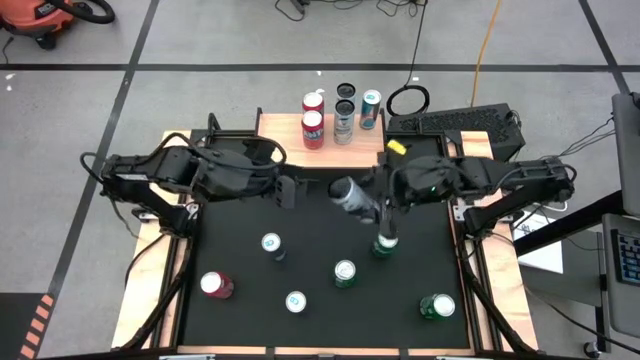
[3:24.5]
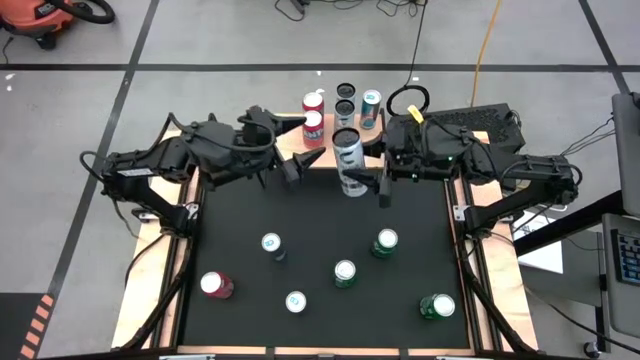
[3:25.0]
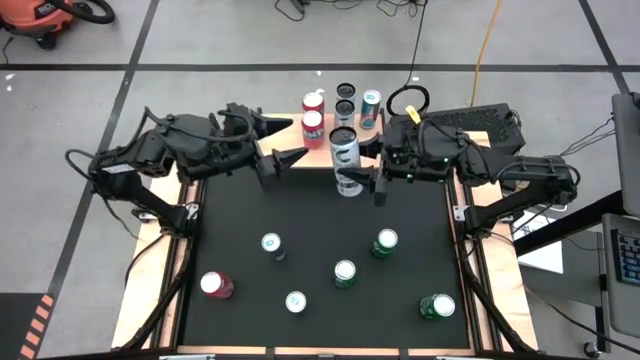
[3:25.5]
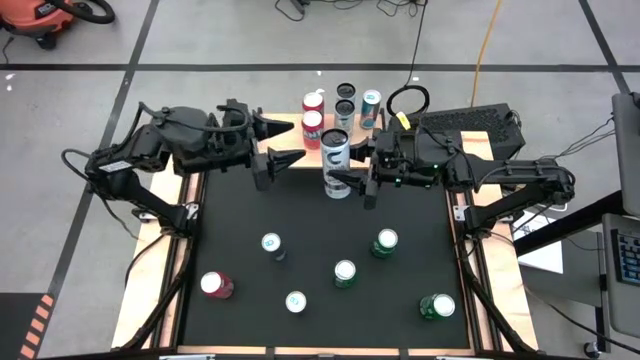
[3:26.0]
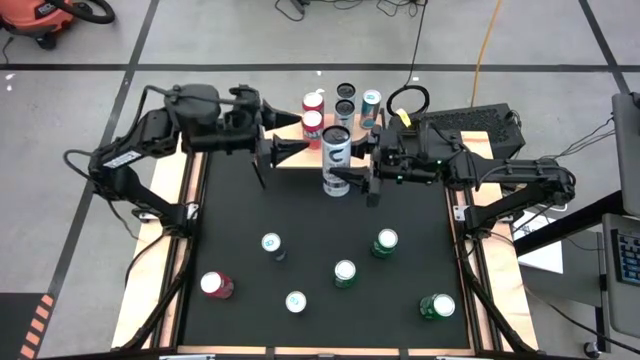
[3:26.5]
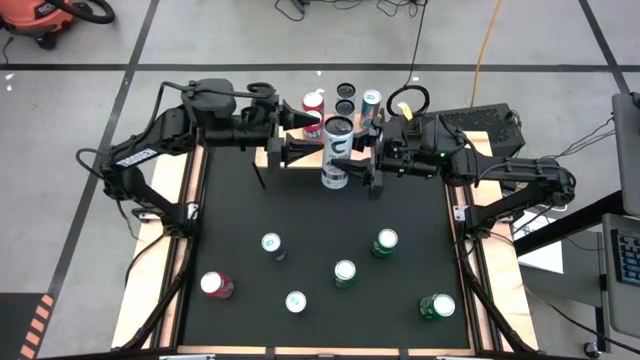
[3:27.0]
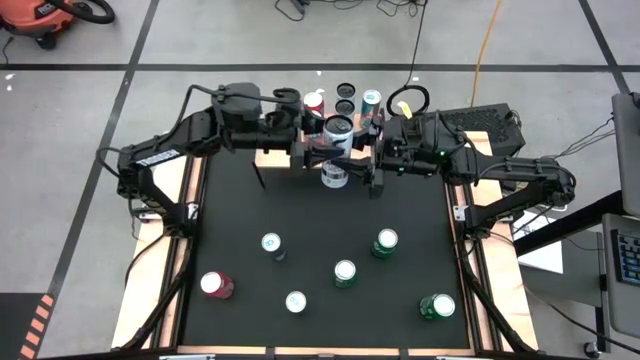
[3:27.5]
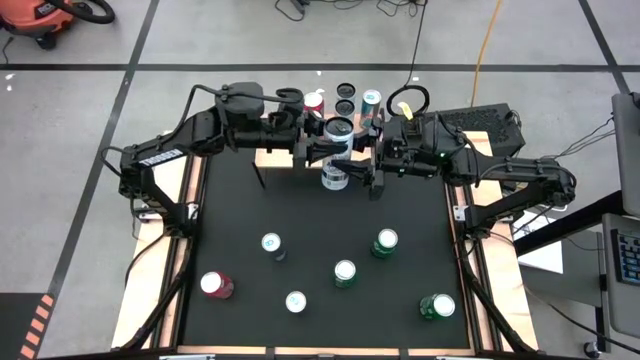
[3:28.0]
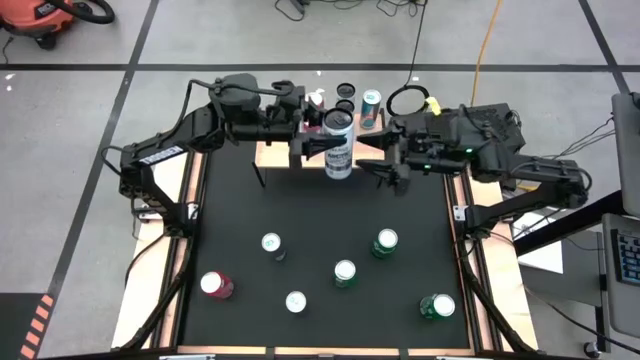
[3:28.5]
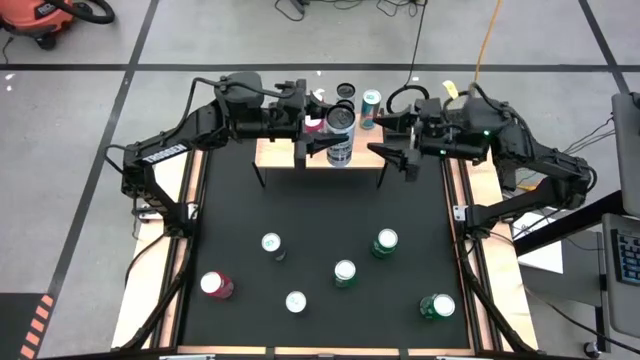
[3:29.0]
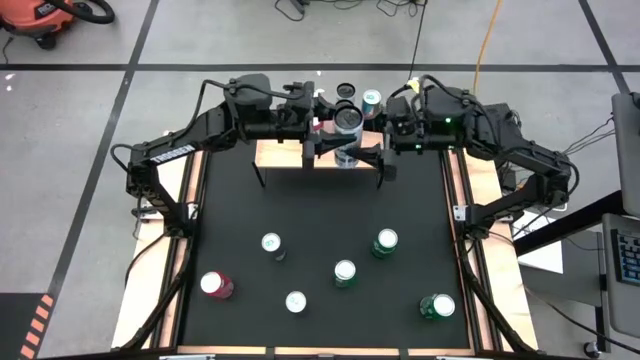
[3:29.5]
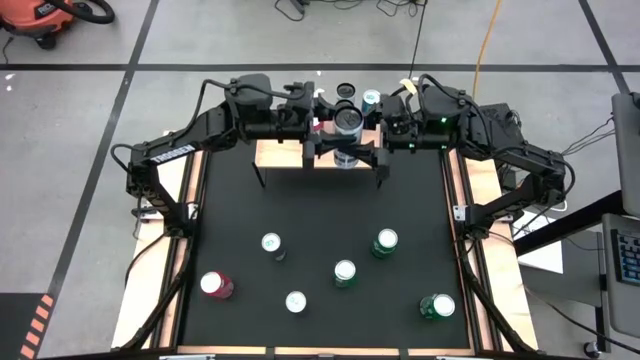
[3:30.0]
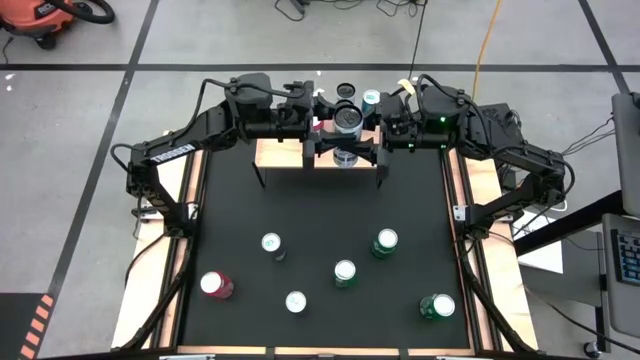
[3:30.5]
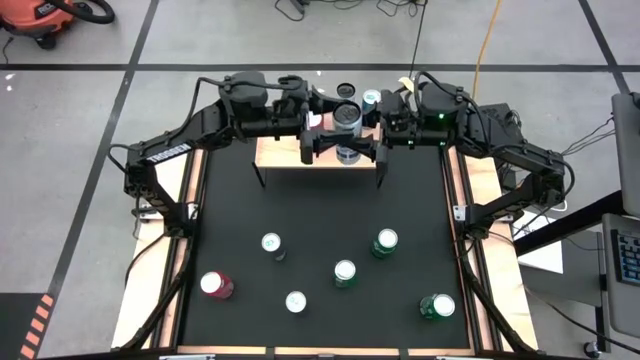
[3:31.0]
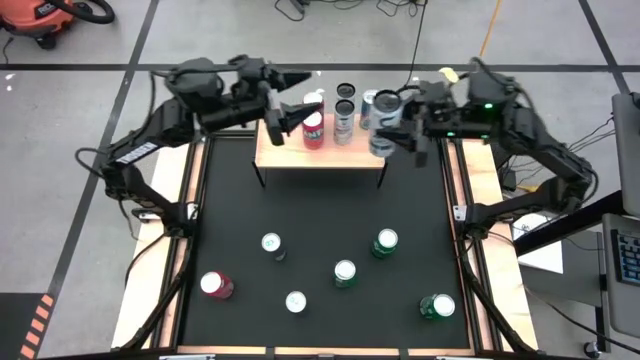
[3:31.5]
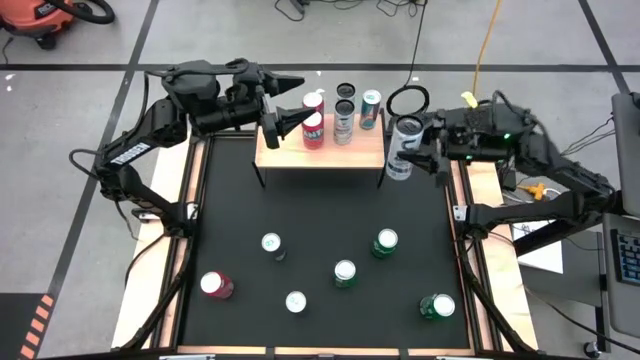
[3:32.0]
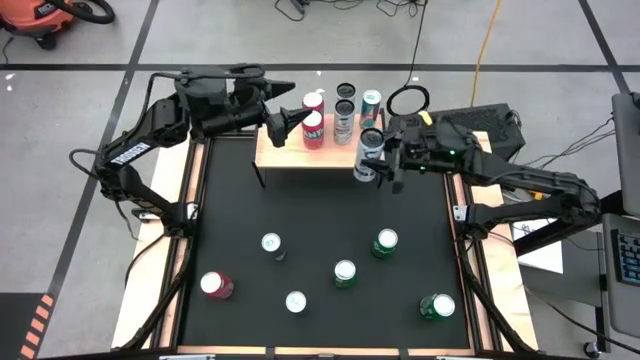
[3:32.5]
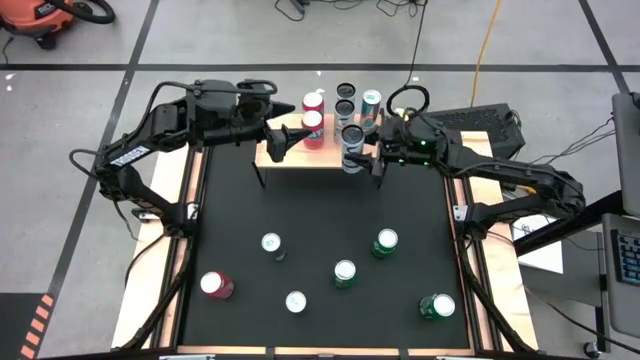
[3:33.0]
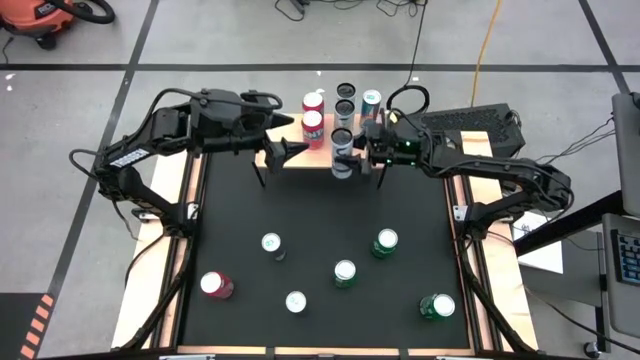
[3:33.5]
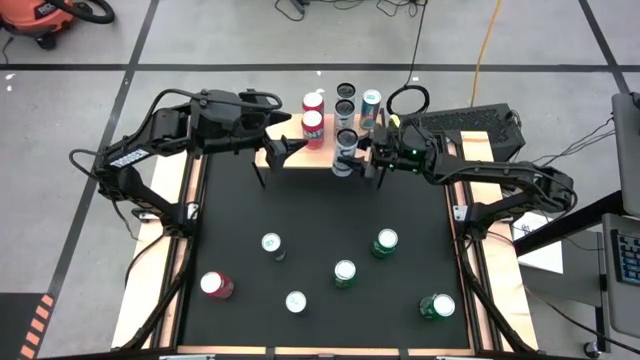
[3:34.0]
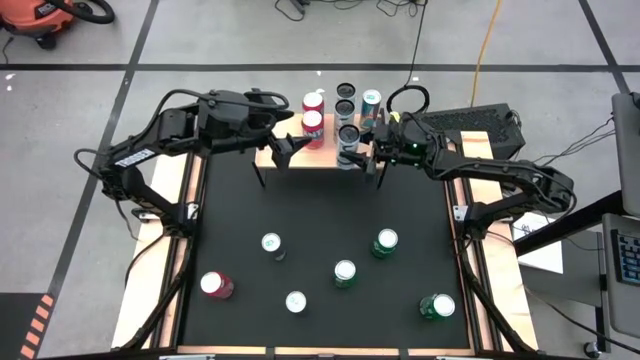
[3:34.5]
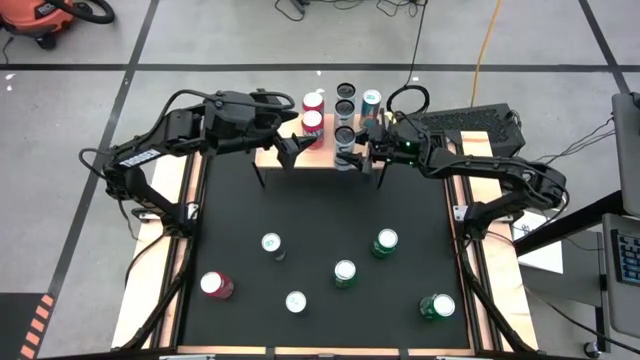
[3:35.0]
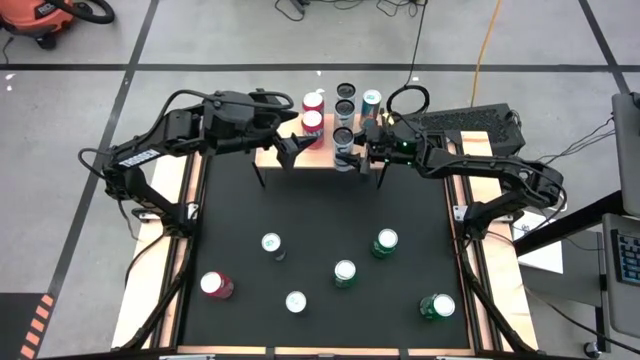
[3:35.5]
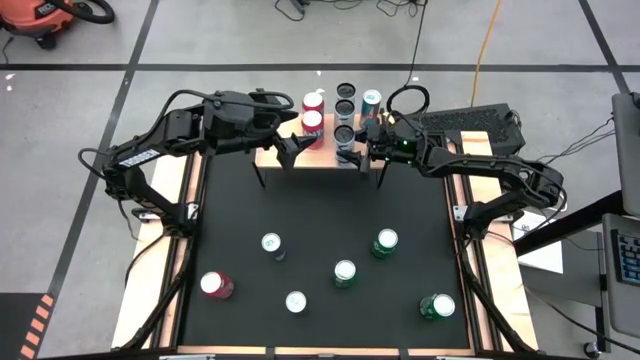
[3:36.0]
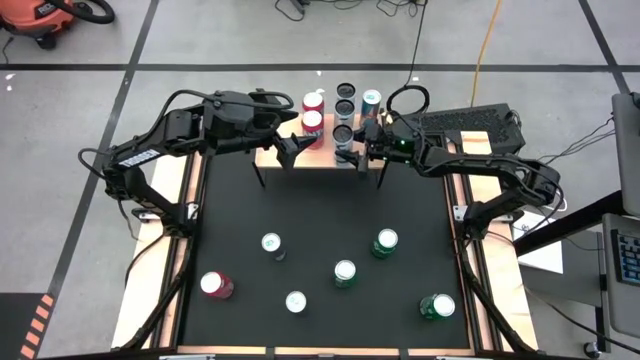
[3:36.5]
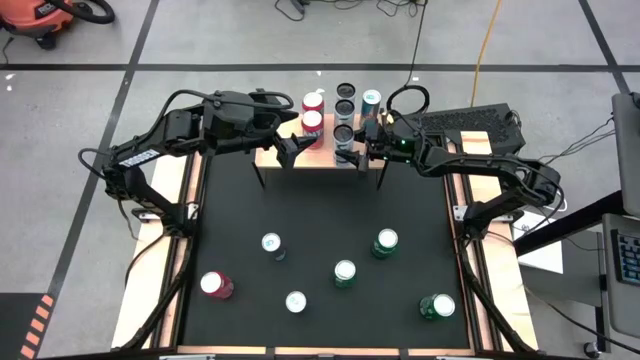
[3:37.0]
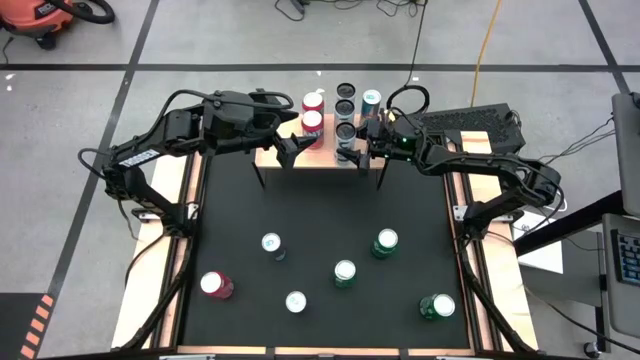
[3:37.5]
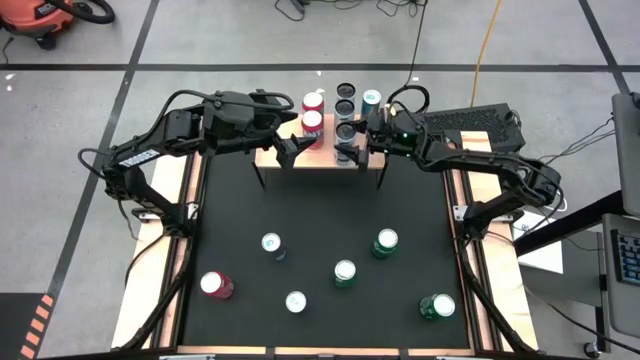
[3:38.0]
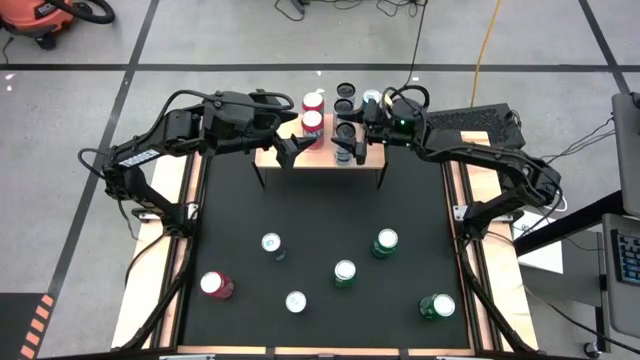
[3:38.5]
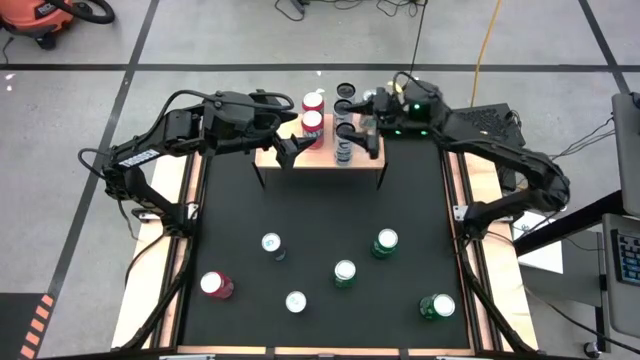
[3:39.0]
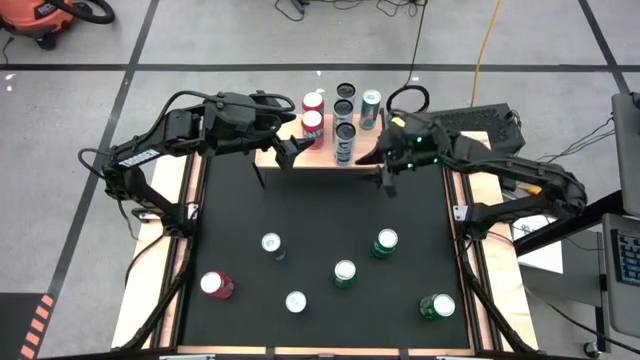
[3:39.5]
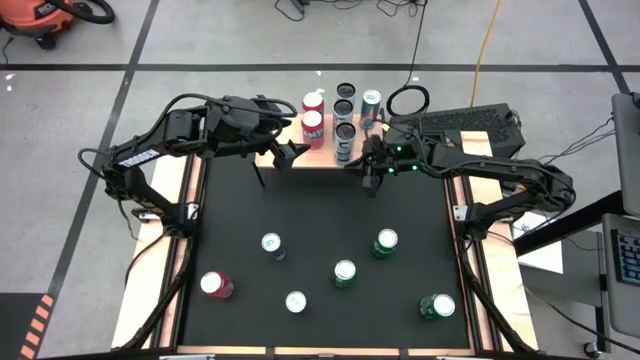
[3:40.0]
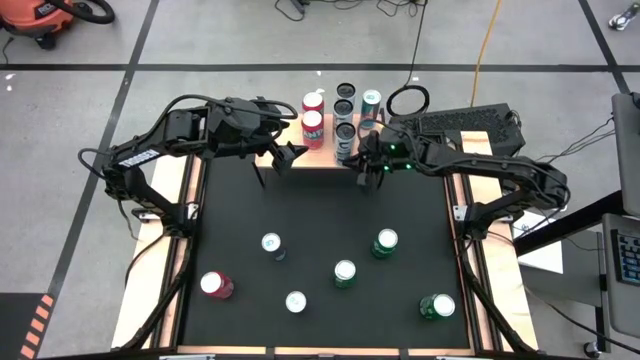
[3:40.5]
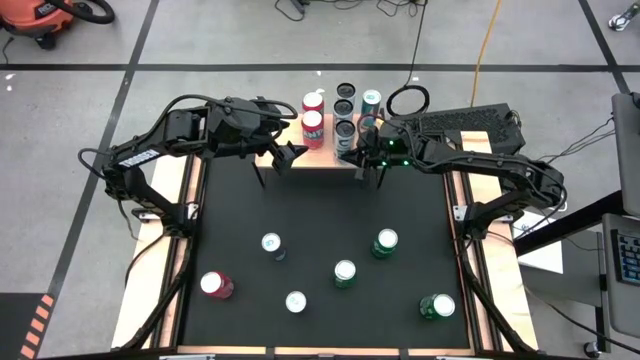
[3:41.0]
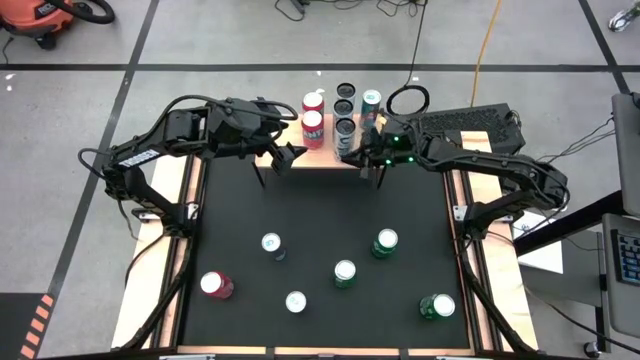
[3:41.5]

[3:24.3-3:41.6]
Task: Place canned beverage on shelf
Put the white soda can on the shelf aligned with the other white soda can

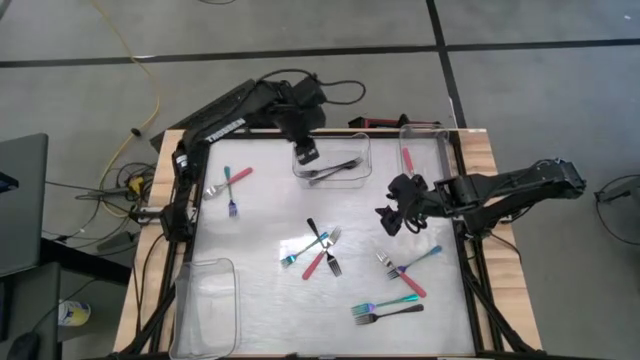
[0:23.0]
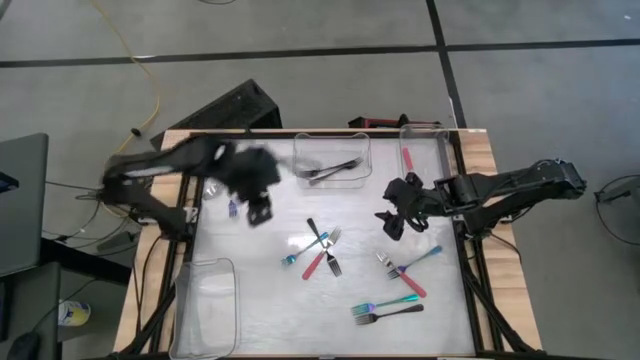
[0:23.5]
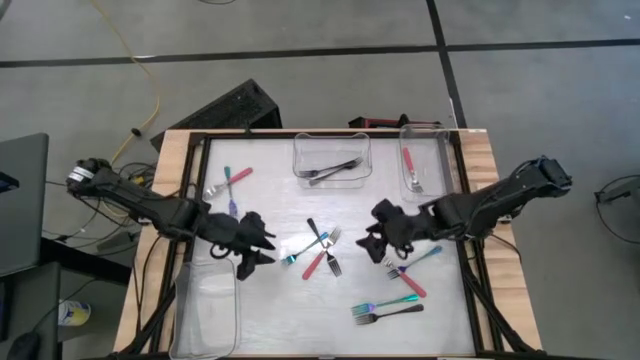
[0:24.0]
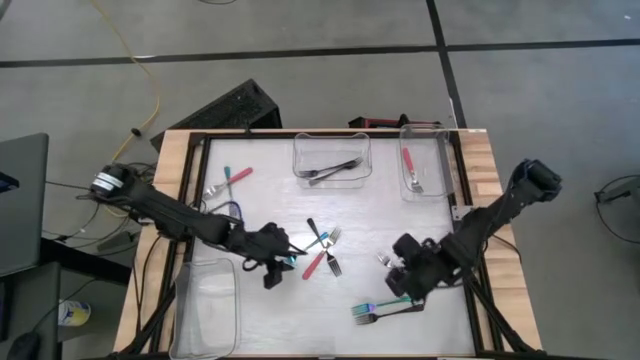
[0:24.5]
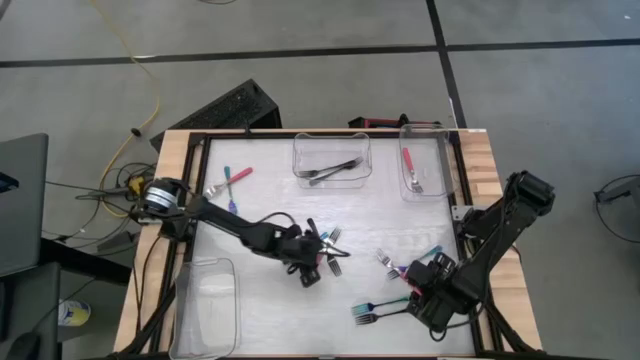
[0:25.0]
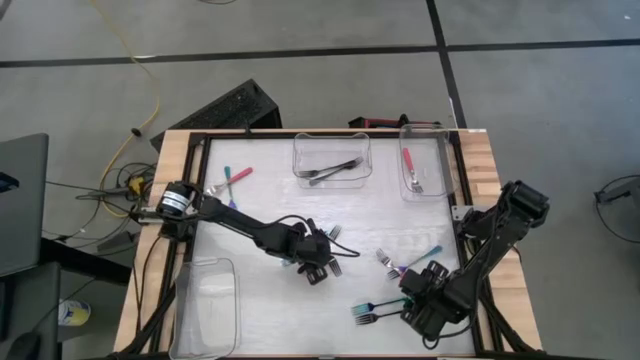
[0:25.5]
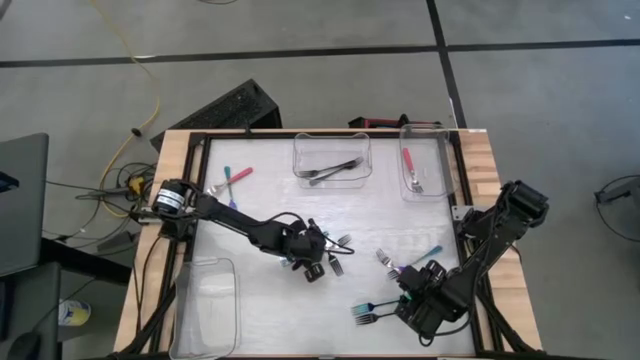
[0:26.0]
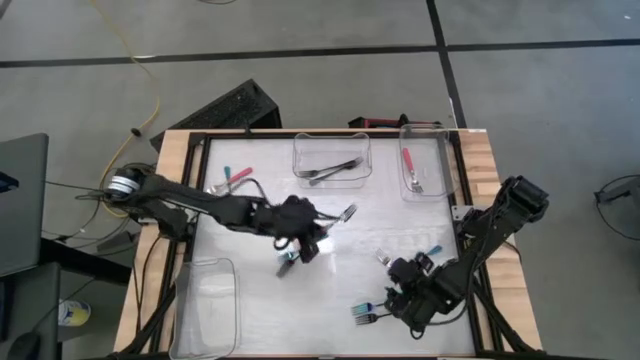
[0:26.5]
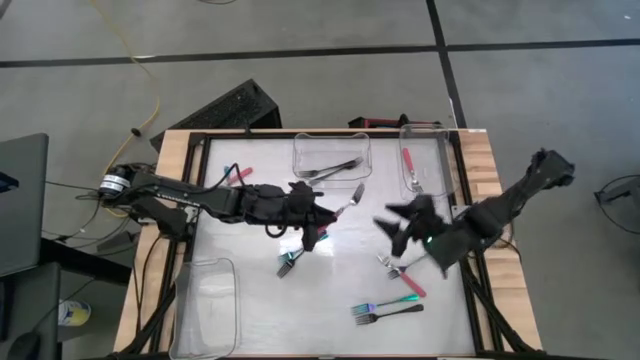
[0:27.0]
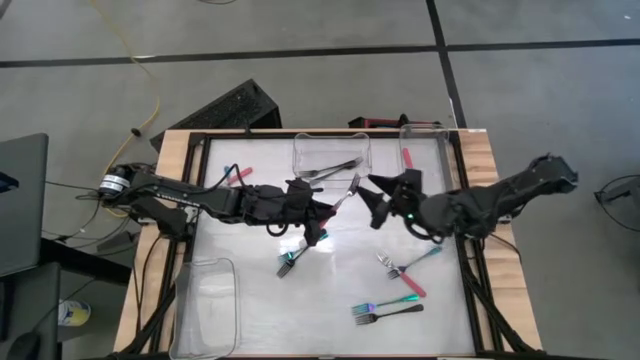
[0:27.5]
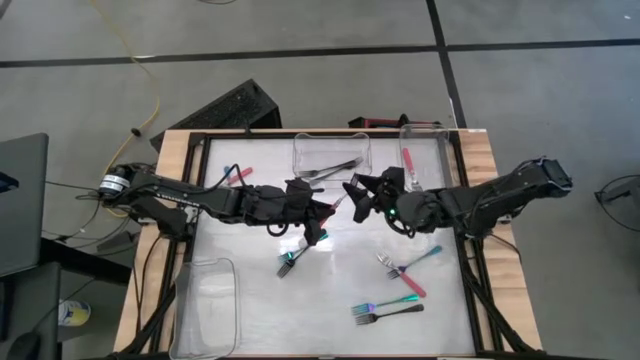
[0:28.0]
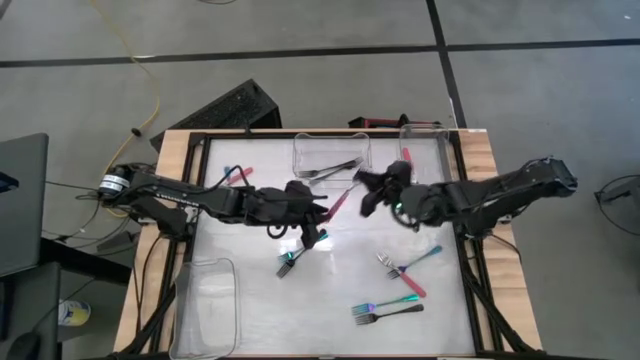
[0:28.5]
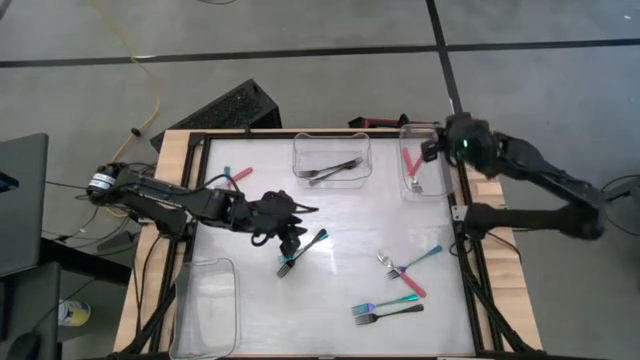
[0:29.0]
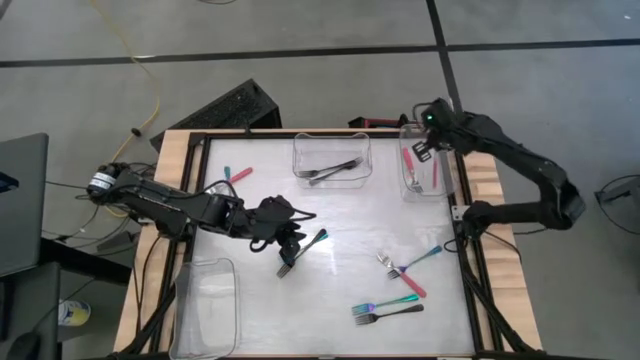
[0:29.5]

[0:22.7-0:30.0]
Task: Sort silverware by color (type)
Put the center pink fork into the top right transparent bin
